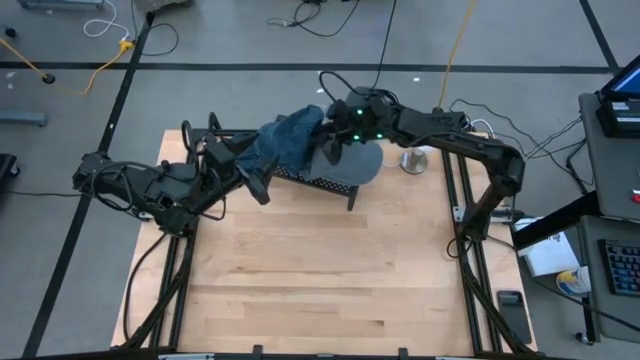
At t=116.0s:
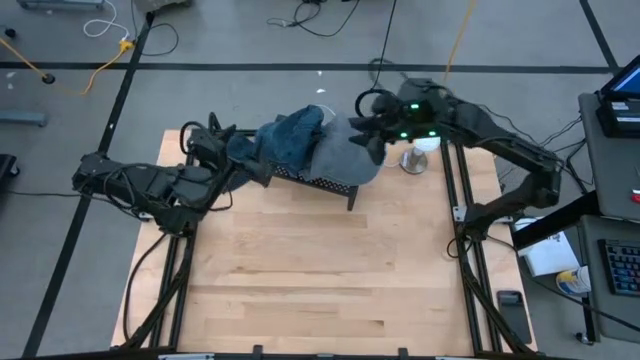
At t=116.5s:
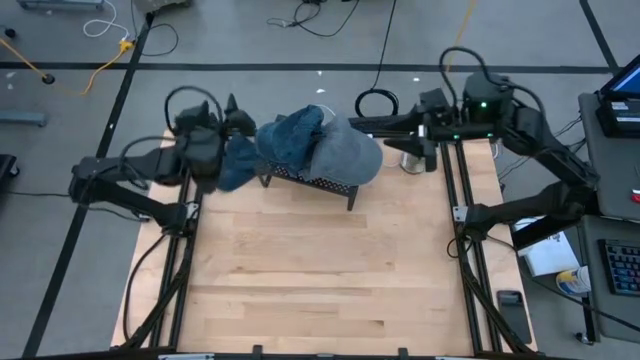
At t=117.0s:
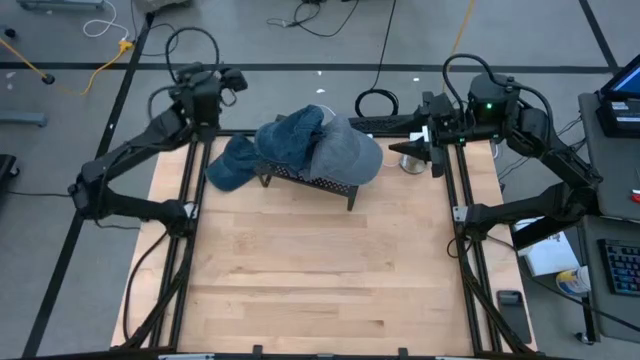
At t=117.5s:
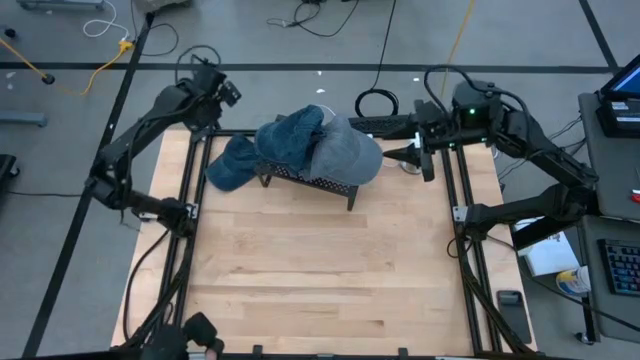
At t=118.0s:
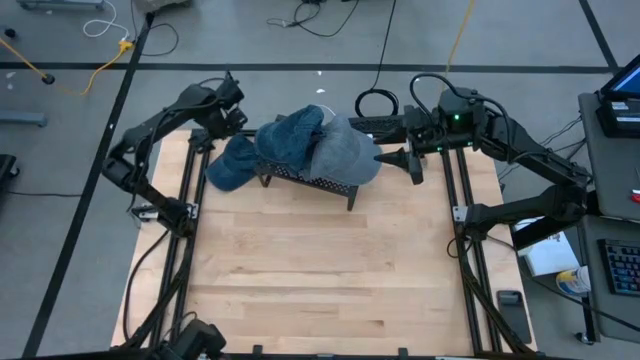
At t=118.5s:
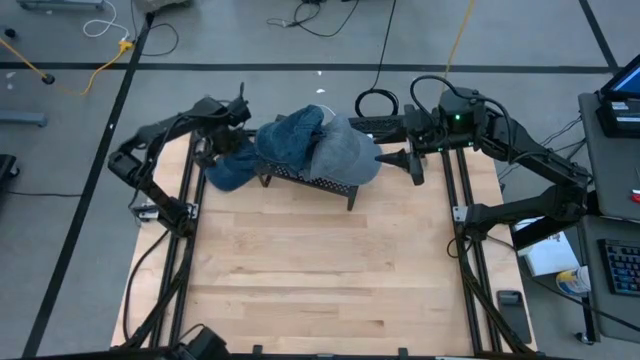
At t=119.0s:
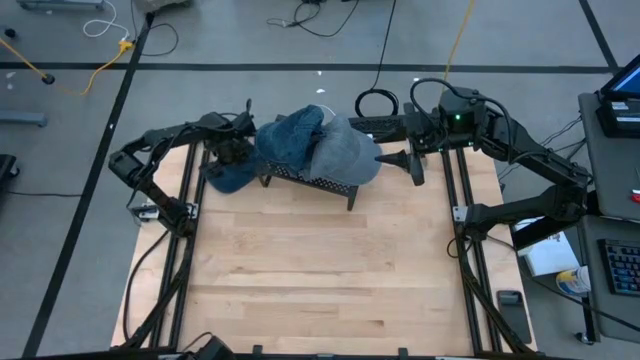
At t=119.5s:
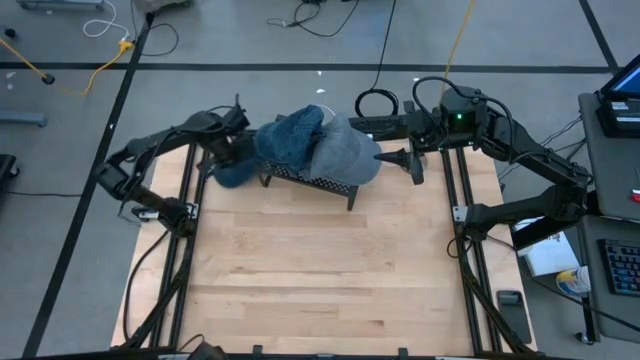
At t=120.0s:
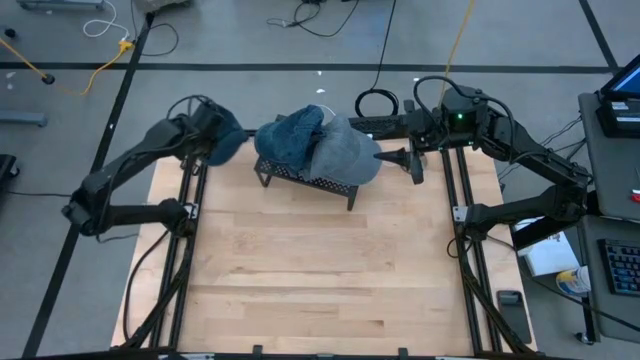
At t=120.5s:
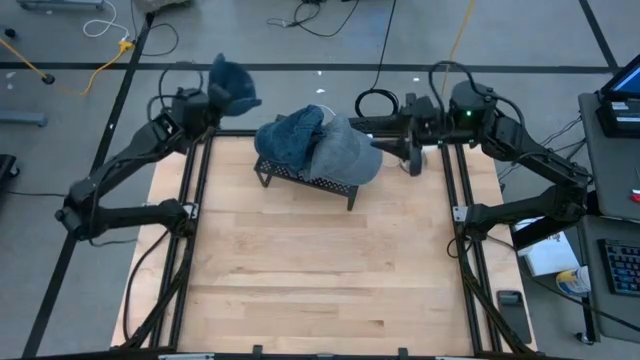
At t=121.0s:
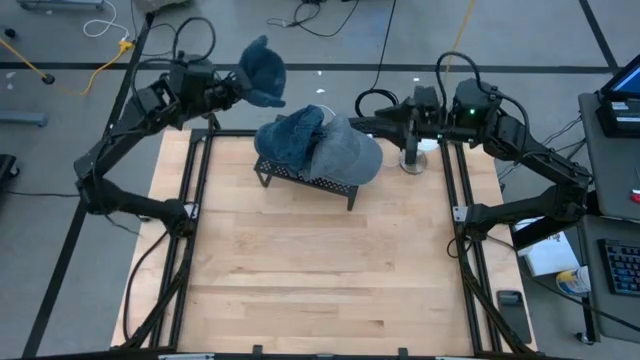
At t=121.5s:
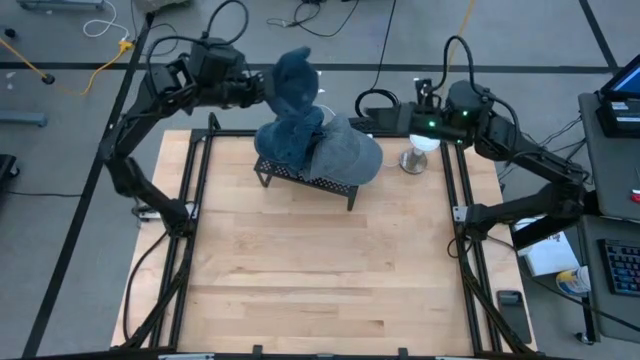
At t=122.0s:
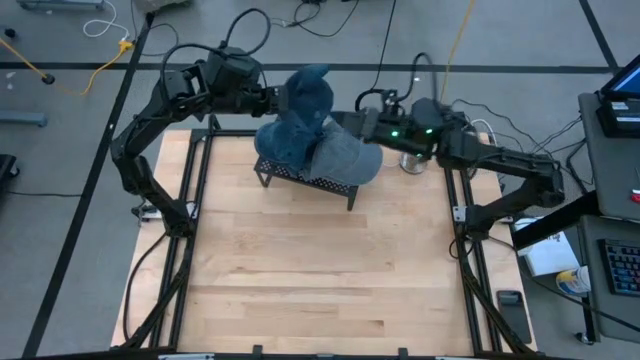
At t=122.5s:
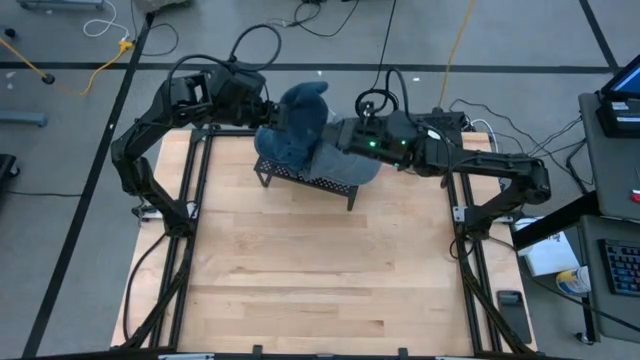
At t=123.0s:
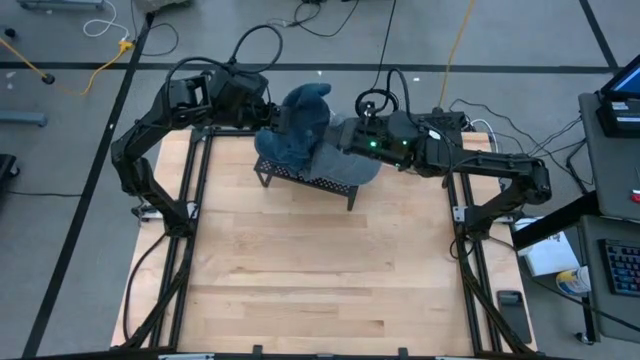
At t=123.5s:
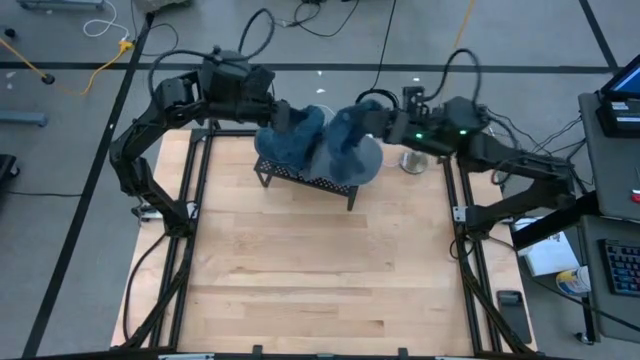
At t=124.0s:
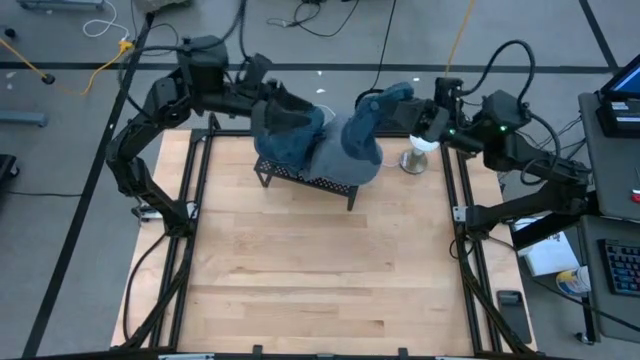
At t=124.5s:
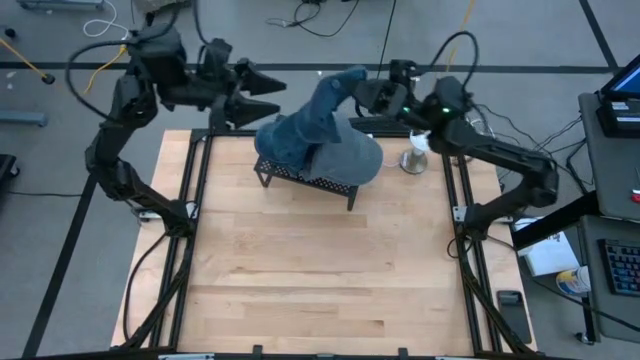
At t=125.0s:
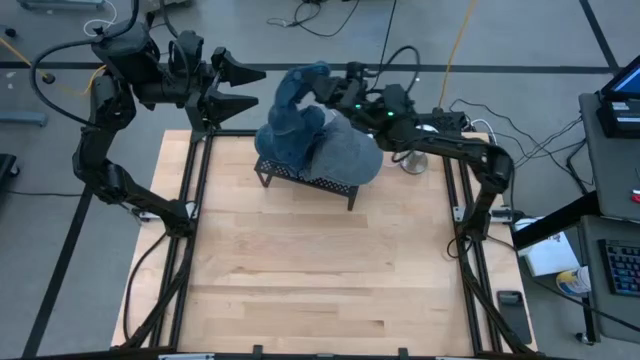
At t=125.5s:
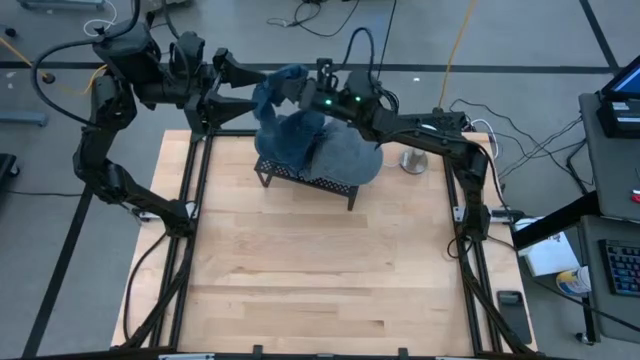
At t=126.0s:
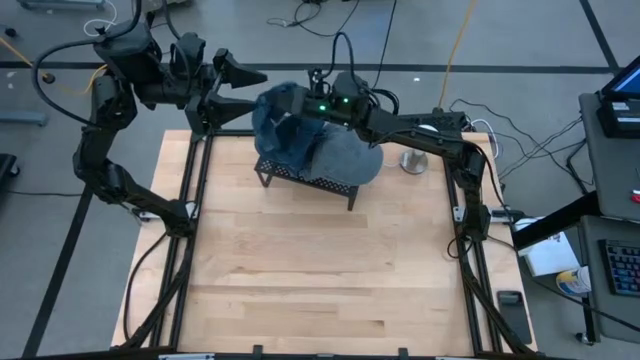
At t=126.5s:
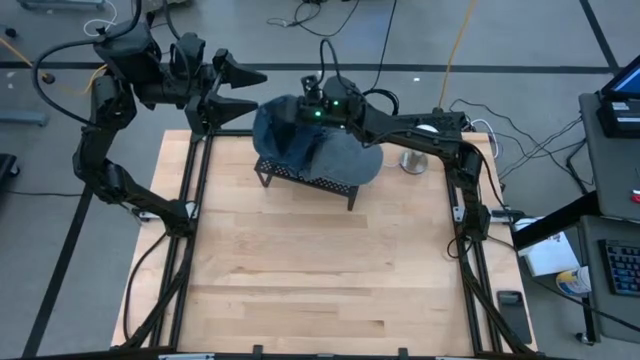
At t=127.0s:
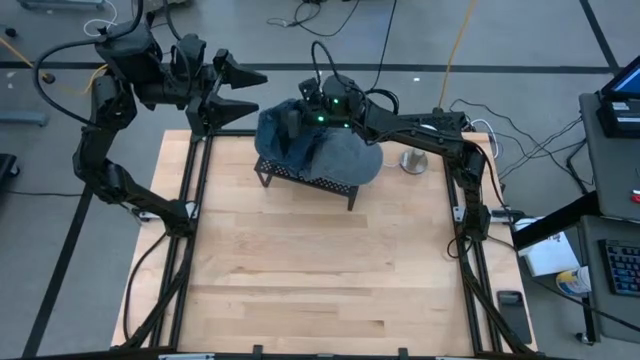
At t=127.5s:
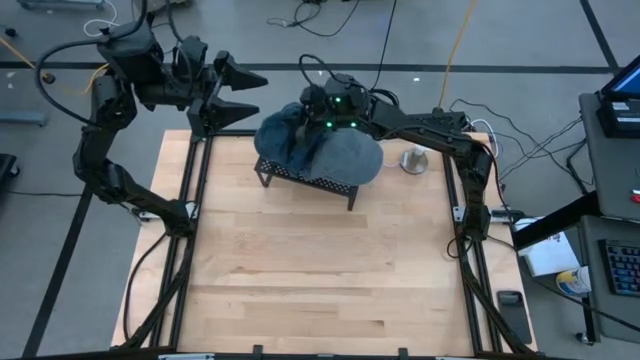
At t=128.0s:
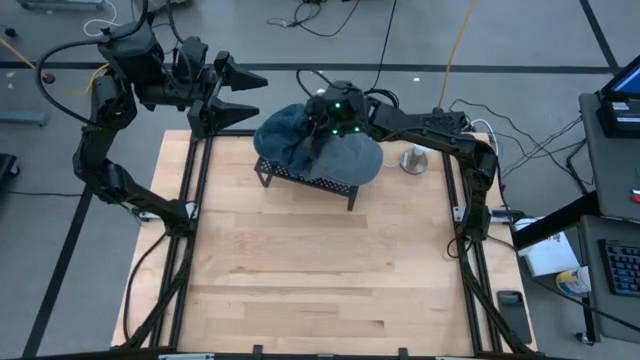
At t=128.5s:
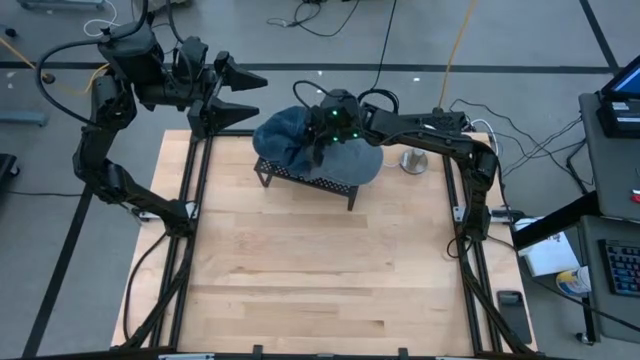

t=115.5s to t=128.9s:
Task: Pick & Place hat
Stack the blue cap on the stacked blue cap on the shelf

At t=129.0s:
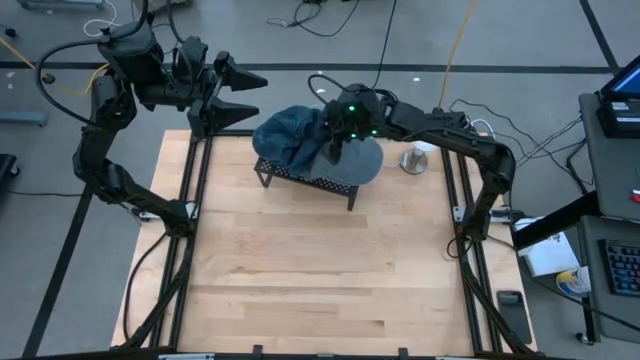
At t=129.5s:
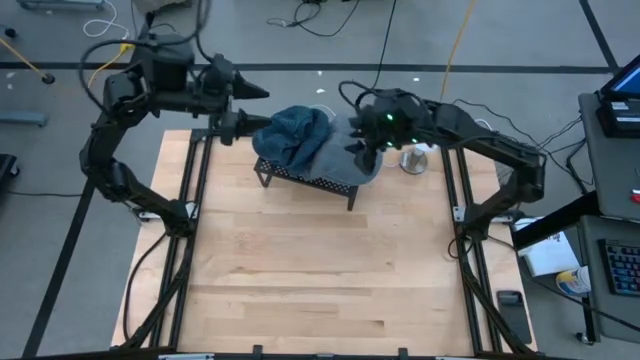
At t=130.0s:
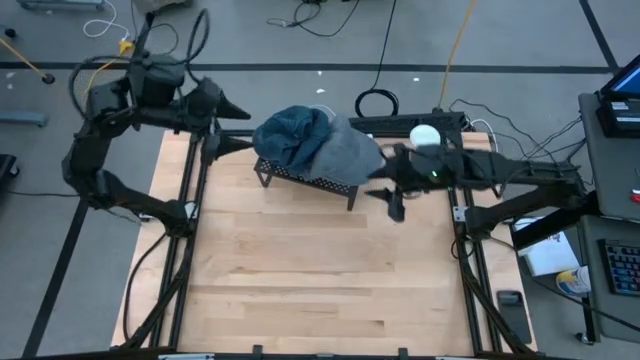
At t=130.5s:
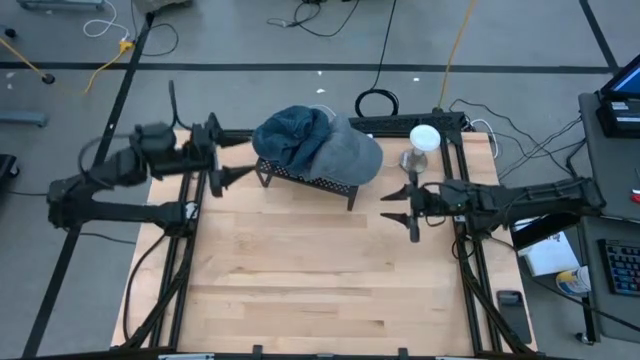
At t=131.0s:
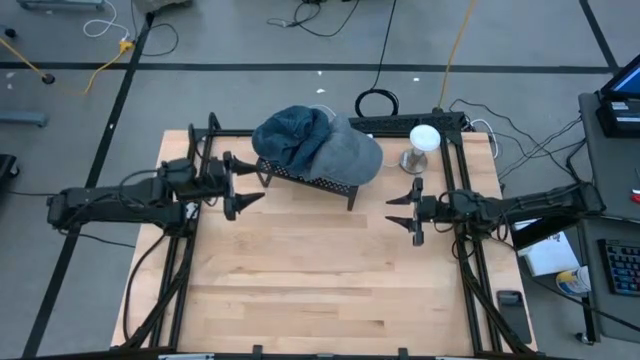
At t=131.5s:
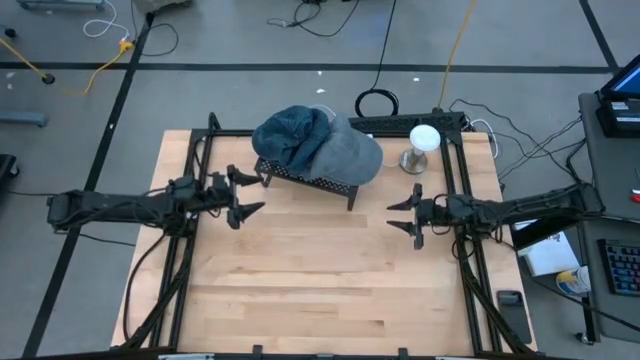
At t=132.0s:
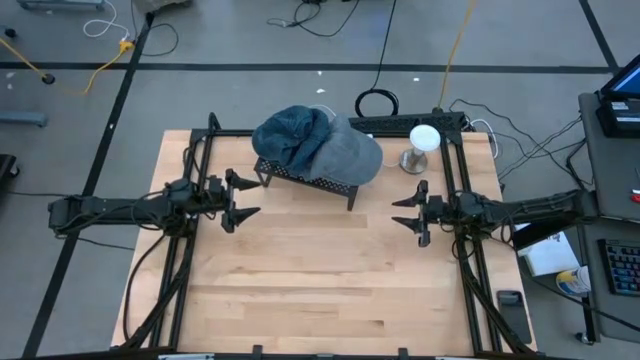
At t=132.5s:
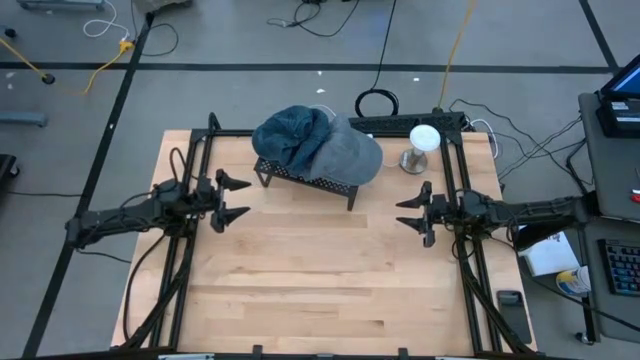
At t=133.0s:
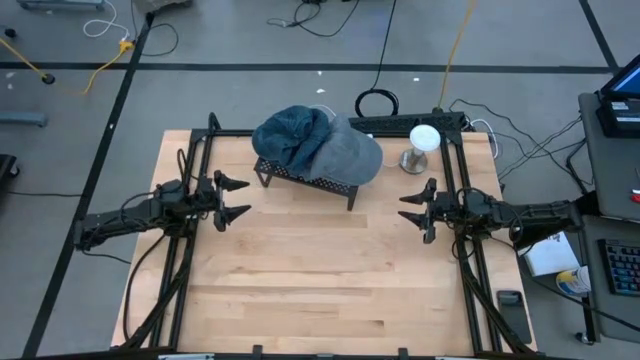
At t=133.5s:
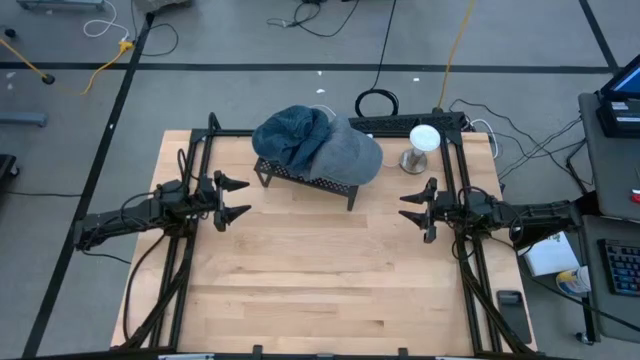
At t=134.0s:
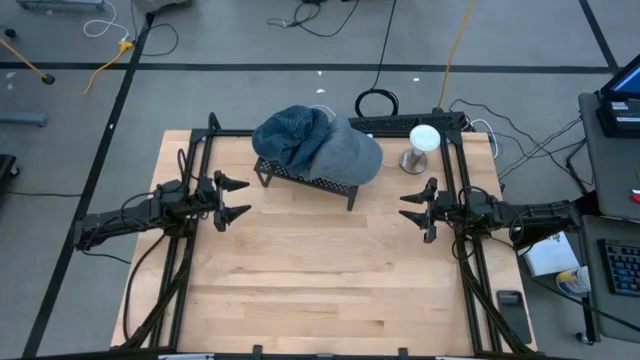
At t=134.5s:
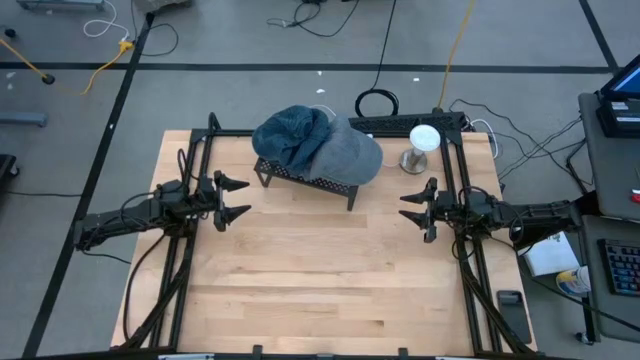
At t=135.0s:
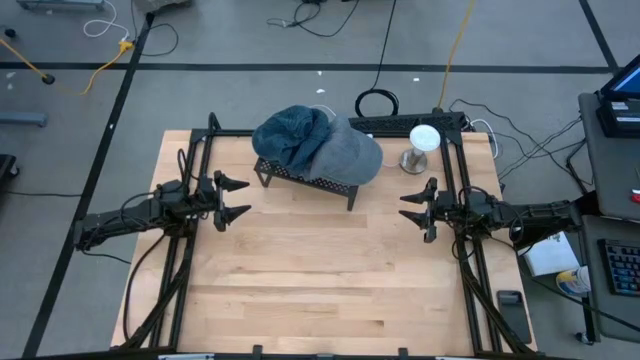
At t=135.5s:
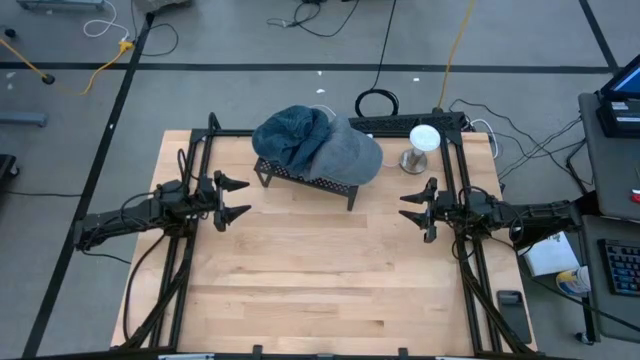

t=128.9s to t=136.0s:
Return to Home Position
